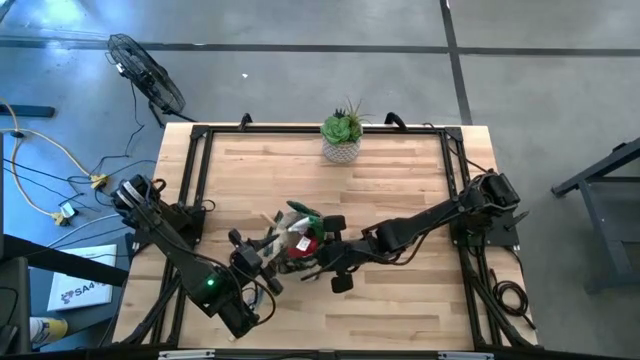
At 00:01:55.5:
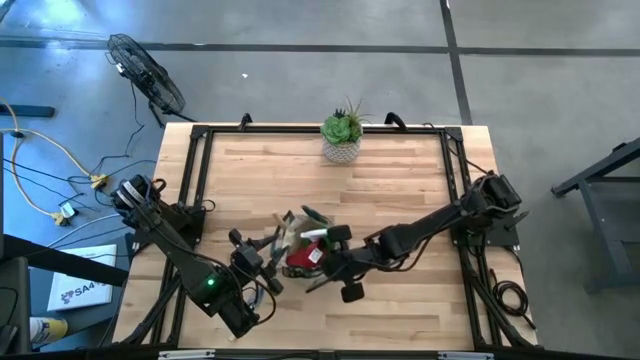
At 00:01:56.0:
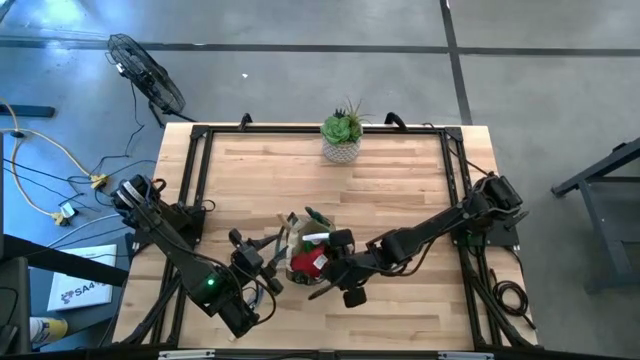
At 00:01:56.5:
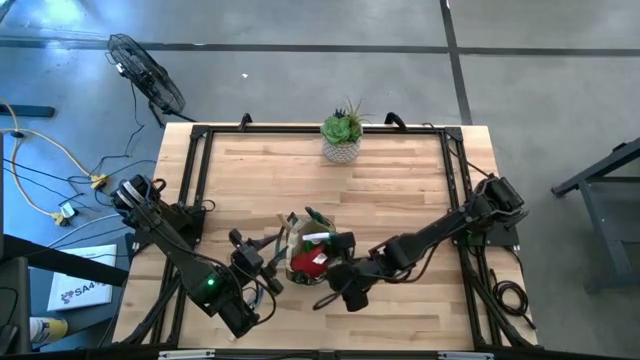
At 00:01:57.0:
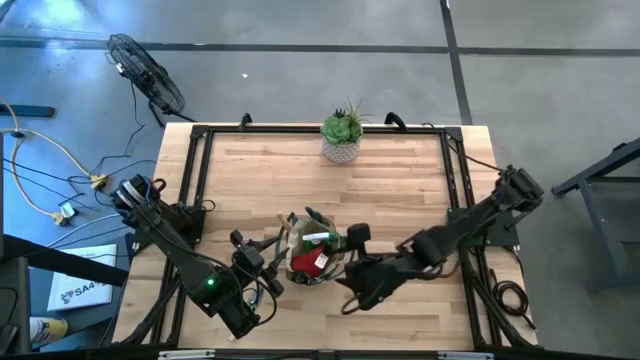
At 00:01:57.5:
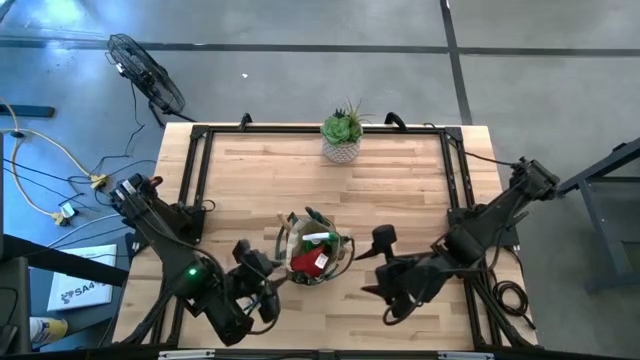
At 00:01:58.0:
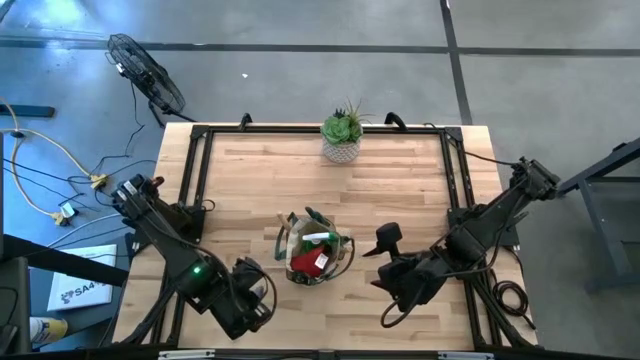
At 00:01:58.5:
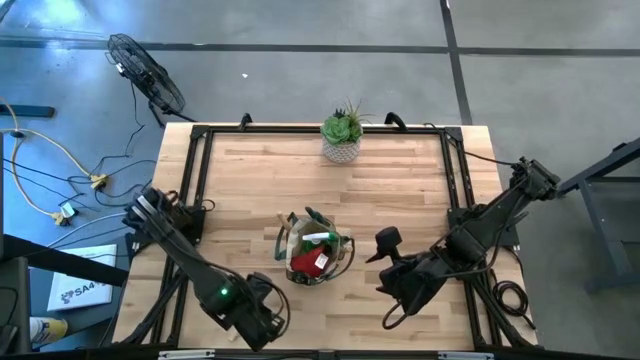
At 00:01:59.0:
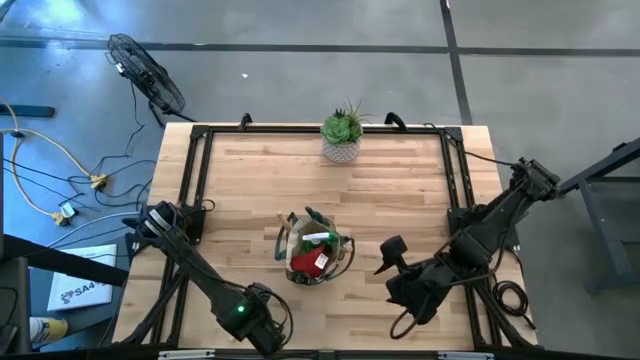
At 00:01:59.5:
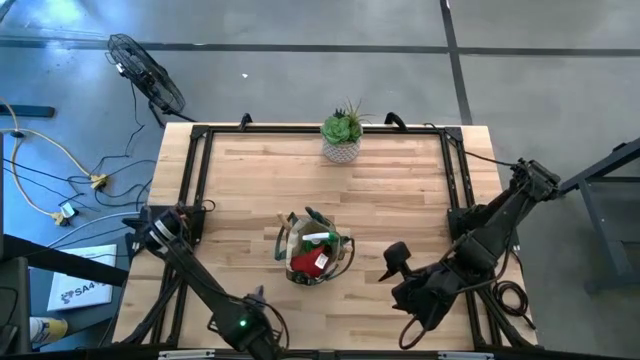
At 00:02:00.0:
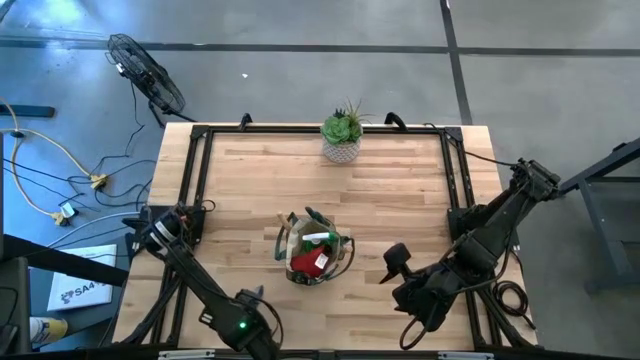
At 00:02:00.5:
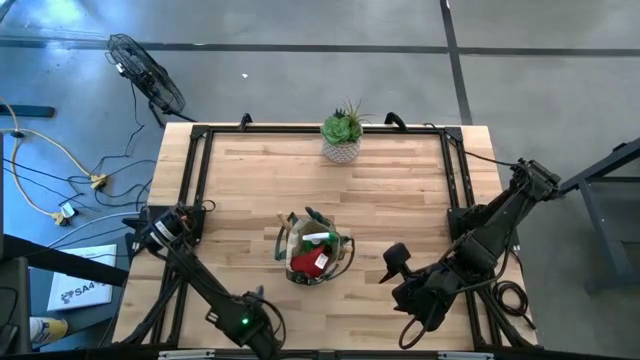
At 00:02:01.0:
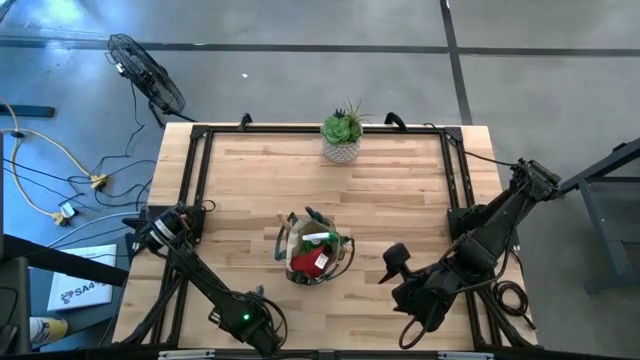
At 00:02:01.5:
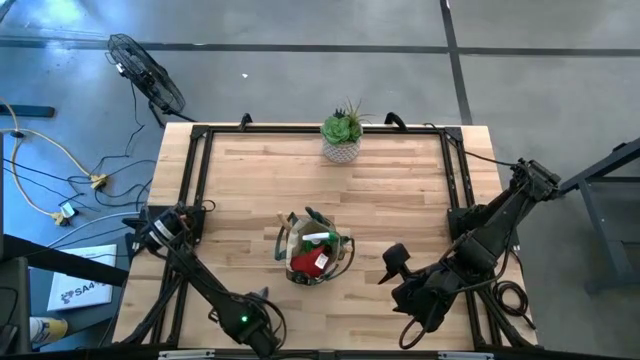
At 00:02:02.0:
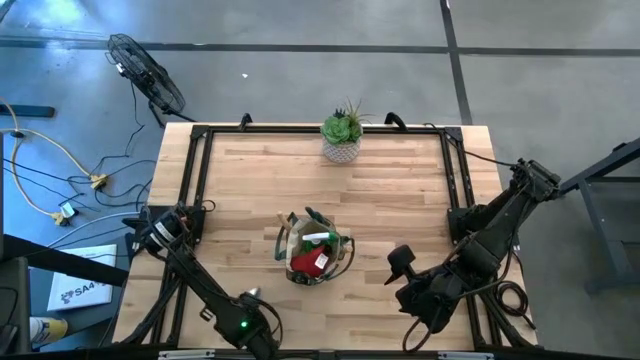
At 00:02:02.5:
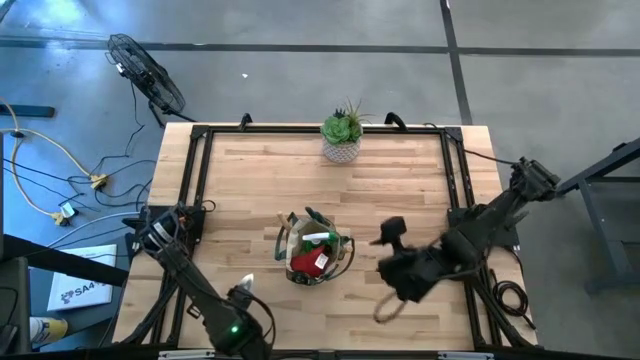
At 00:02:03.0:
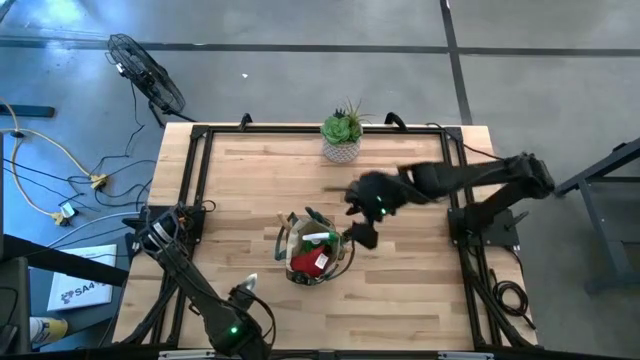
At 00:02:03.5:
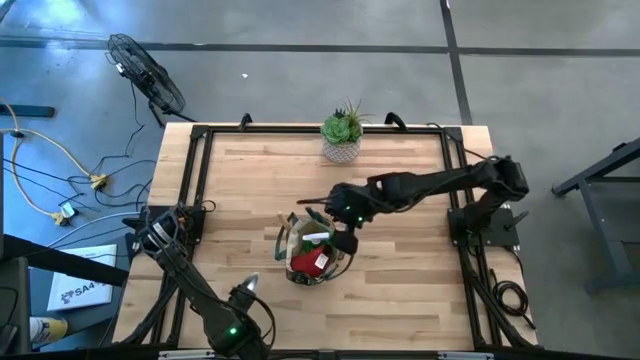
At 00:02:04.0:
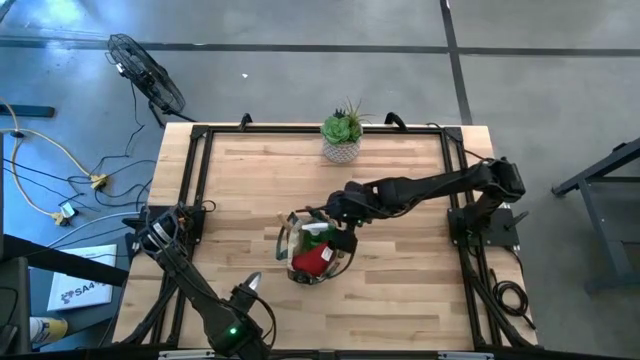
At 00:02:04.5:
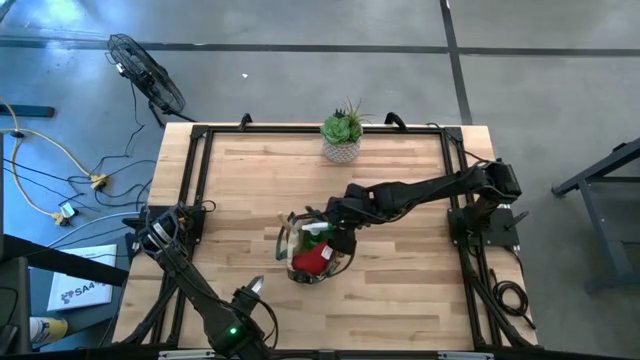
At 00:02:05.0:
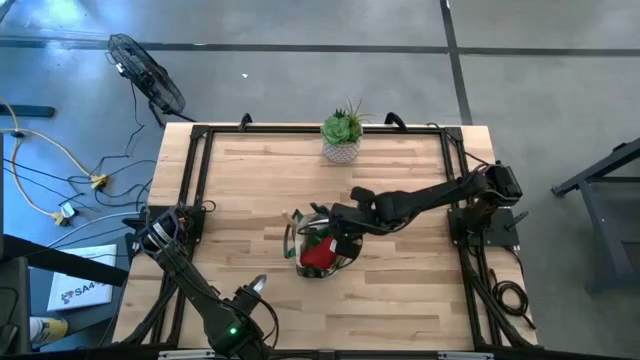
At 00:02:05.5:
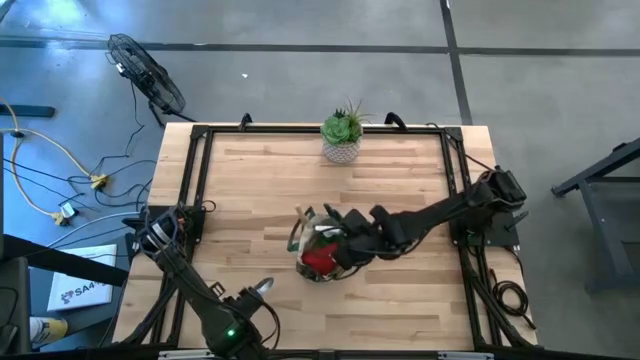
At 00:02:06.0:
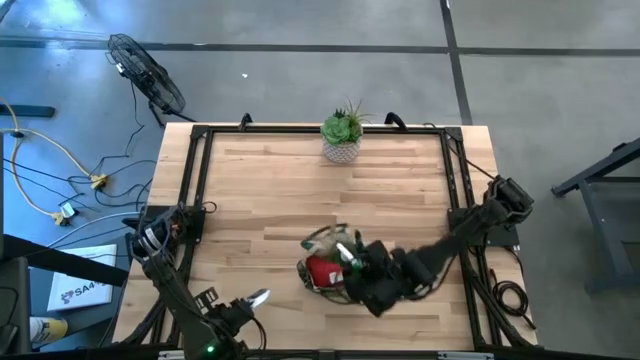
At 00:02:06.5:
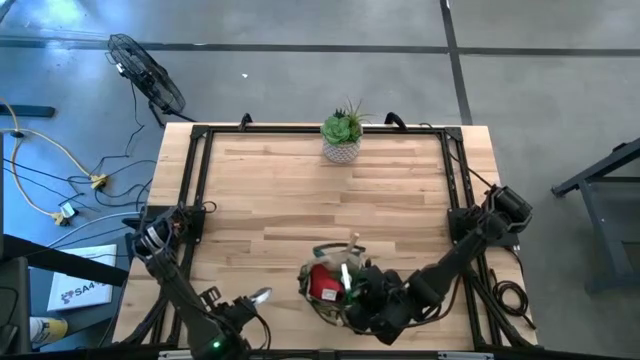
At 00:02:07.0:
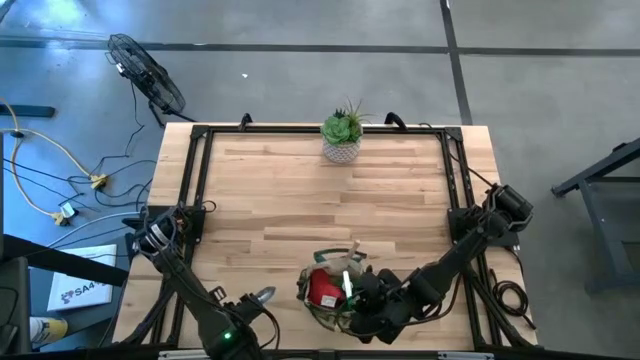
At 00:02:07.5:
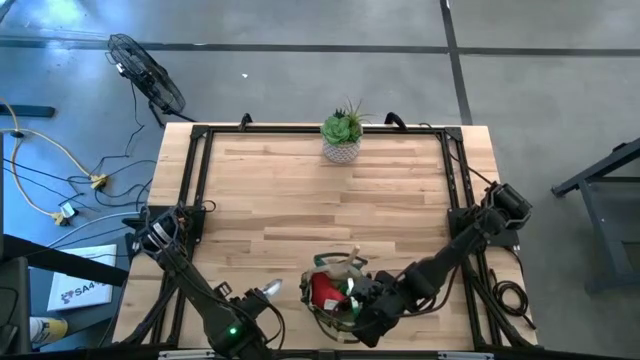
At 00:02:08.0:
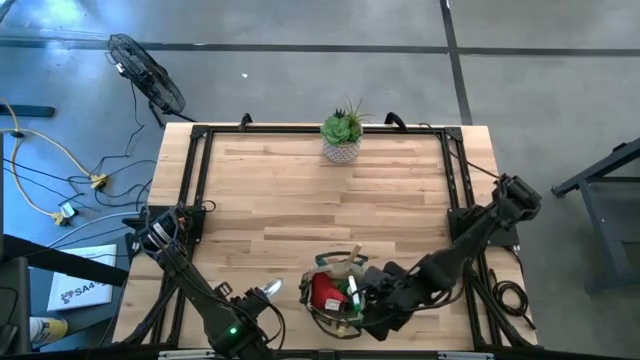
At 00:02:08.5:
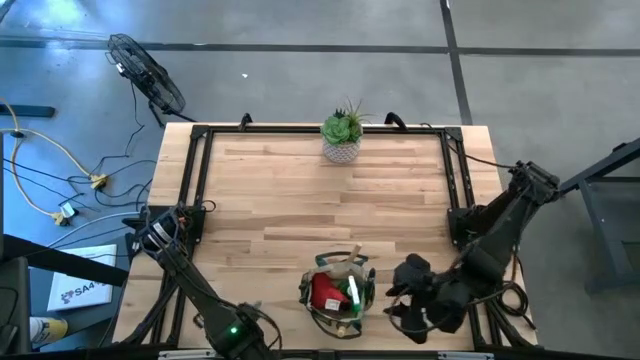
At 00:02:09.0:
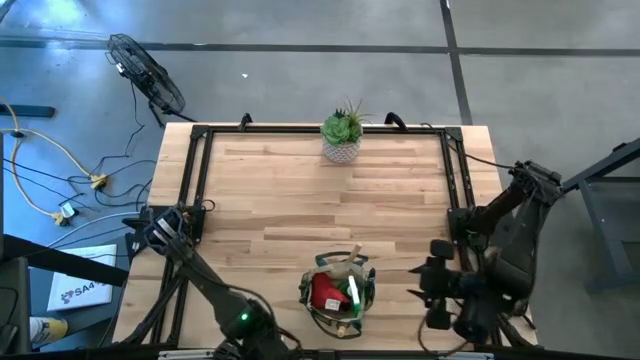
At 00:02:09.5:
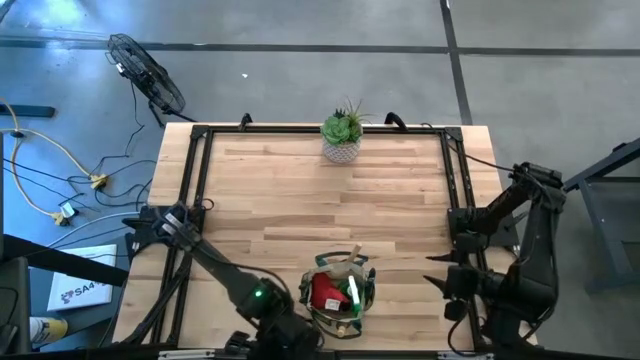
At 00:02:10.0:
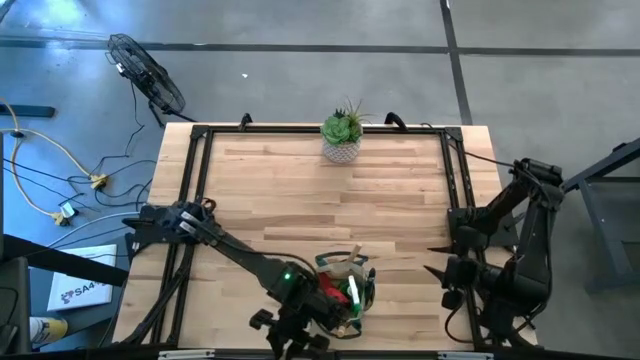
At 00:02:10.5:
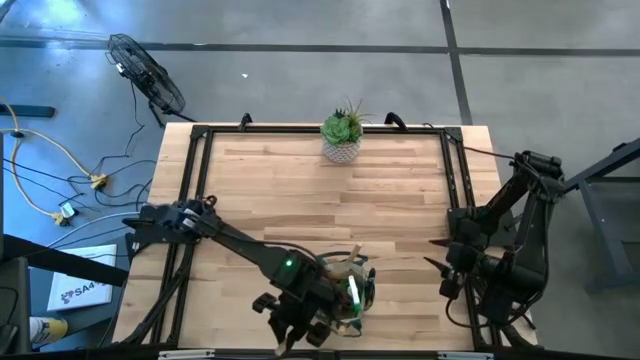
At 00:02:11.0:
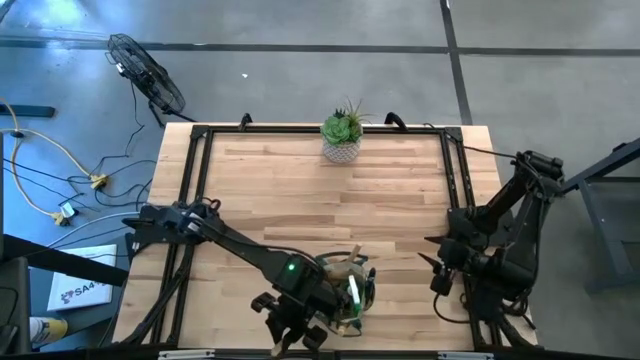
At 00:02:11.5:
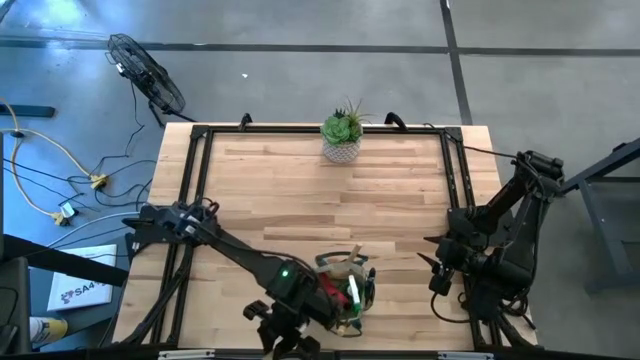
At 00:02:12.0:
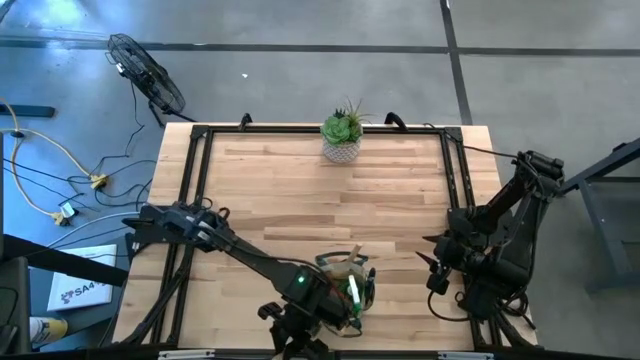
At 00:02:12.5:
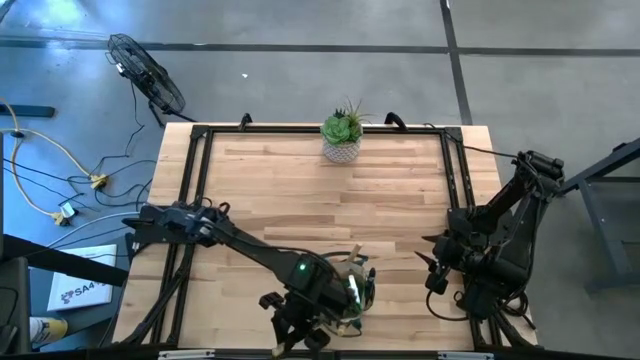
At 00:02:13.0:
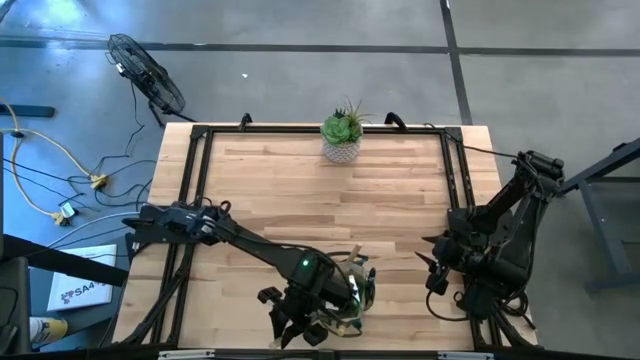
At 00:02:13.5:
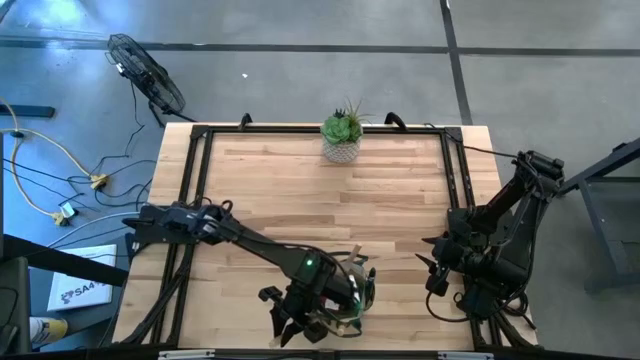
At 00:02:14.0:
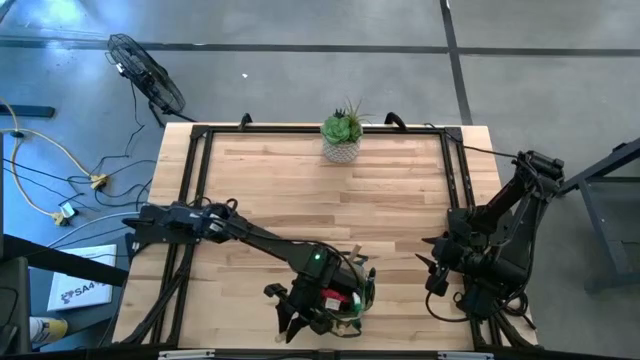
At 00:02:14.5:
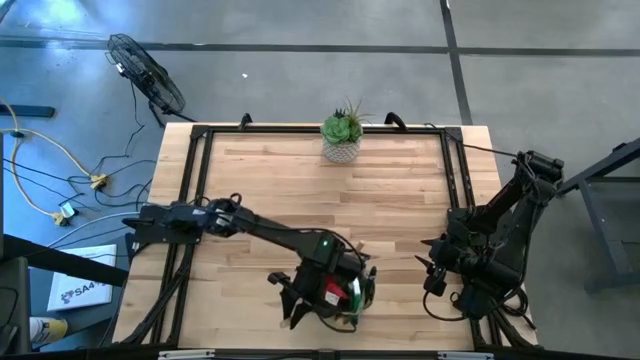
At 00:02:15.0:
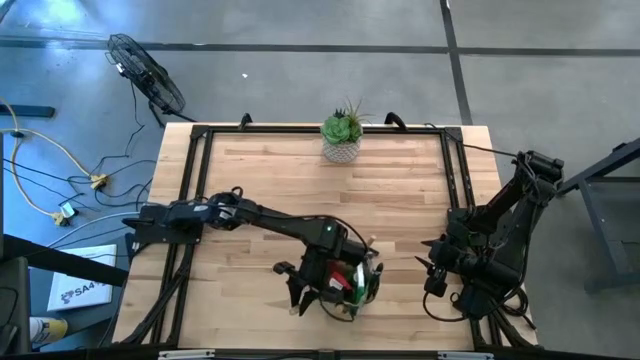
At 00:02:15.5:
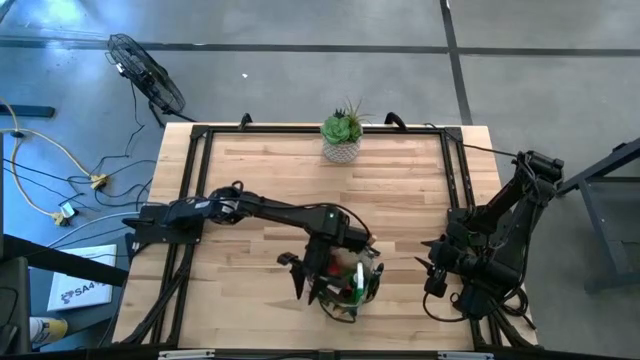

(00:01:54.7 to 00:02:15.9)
Task: Pick & Place Garden tools in Gardening bag
Put the trowel into the gardening bag
